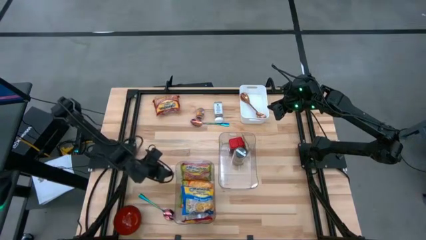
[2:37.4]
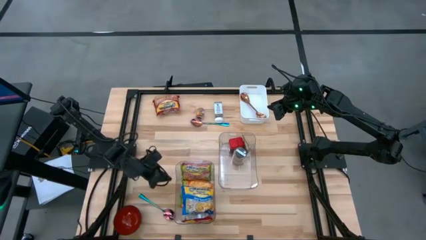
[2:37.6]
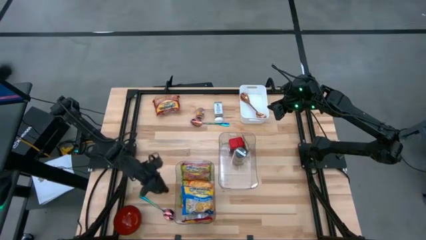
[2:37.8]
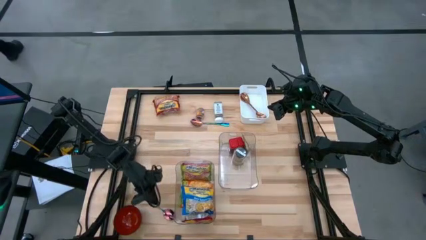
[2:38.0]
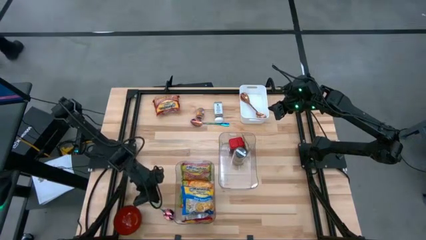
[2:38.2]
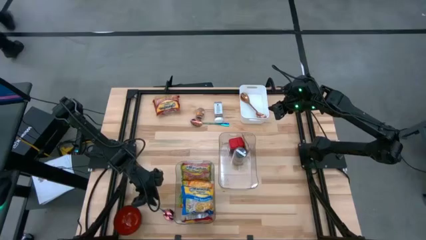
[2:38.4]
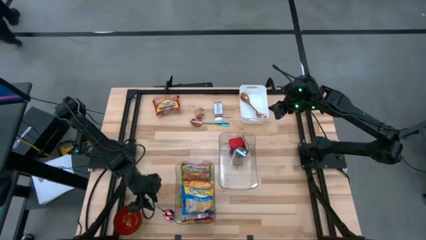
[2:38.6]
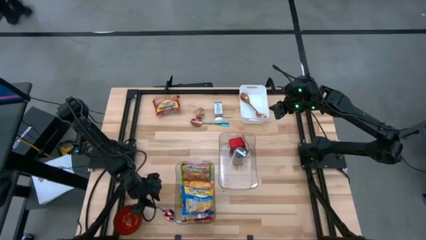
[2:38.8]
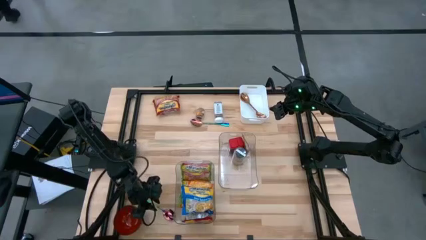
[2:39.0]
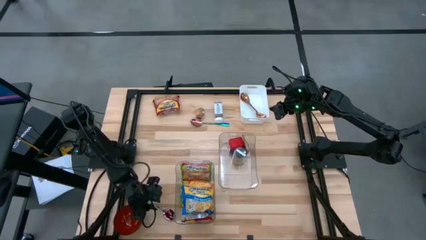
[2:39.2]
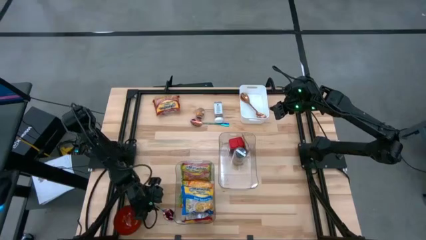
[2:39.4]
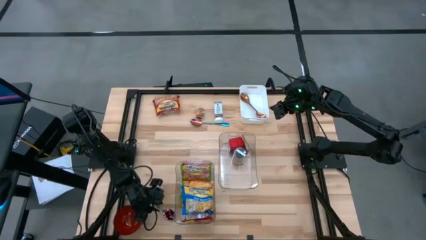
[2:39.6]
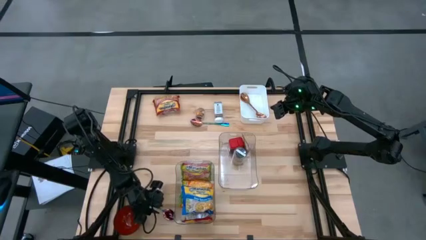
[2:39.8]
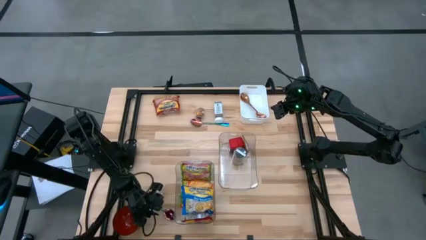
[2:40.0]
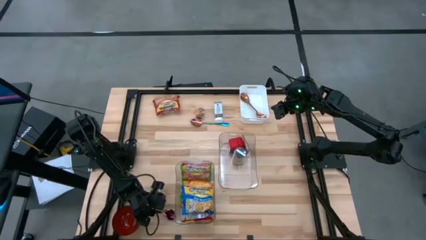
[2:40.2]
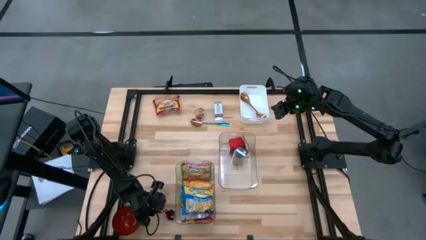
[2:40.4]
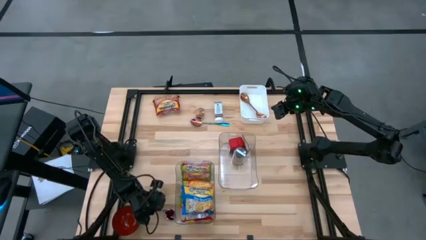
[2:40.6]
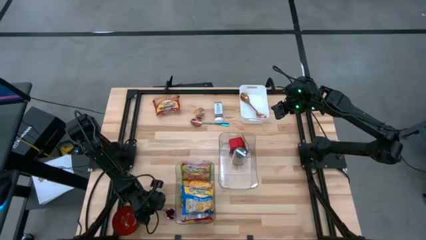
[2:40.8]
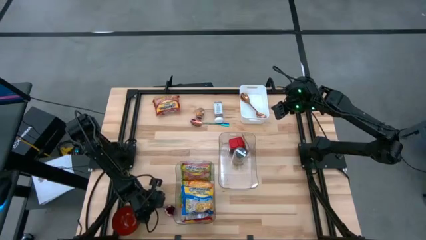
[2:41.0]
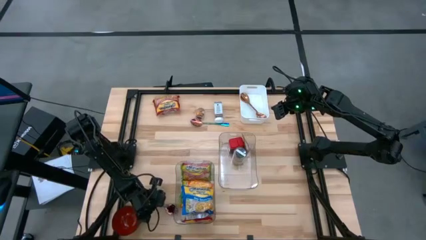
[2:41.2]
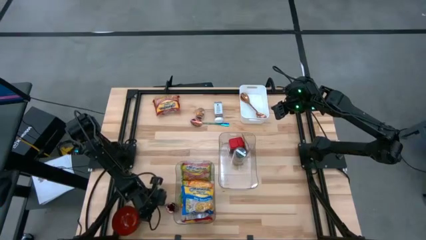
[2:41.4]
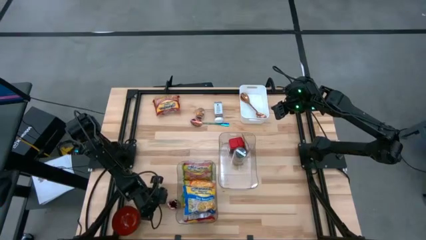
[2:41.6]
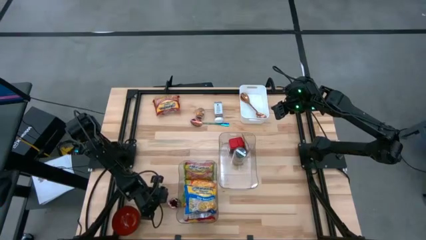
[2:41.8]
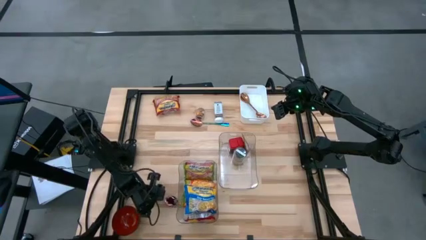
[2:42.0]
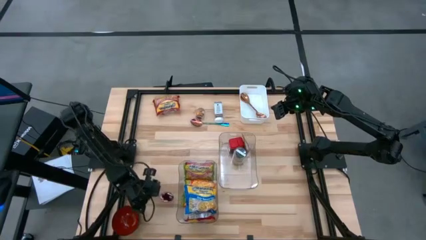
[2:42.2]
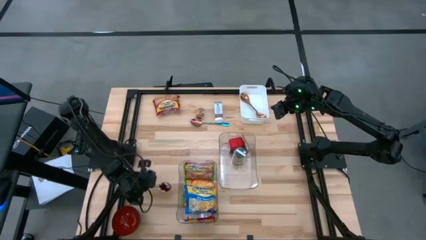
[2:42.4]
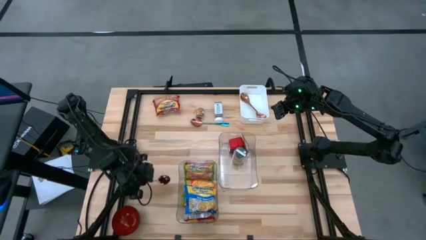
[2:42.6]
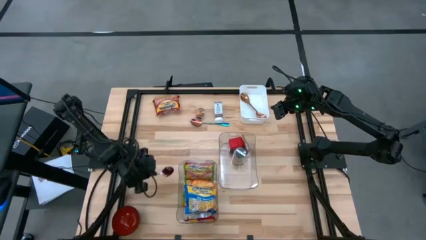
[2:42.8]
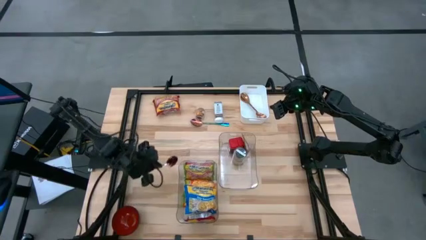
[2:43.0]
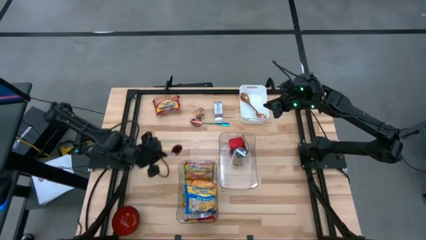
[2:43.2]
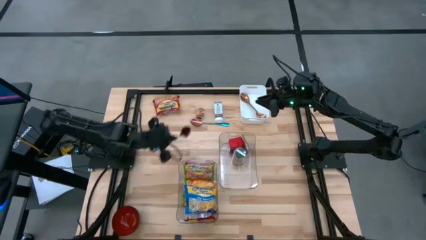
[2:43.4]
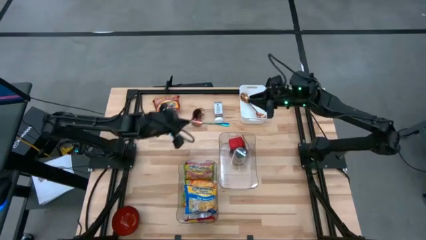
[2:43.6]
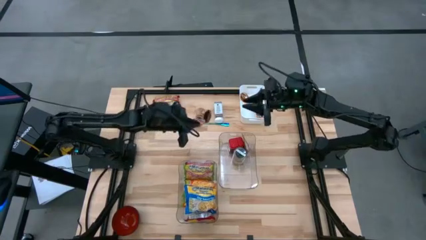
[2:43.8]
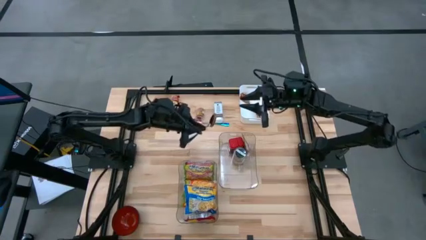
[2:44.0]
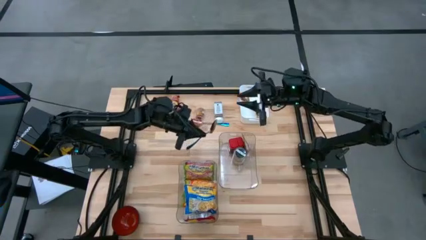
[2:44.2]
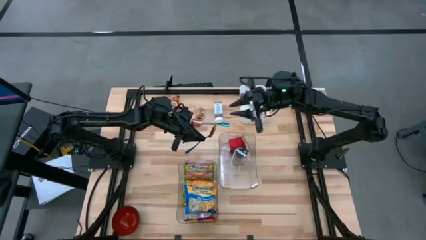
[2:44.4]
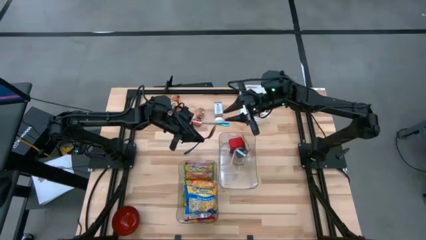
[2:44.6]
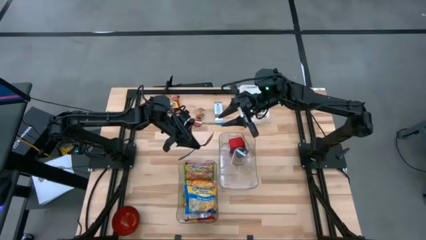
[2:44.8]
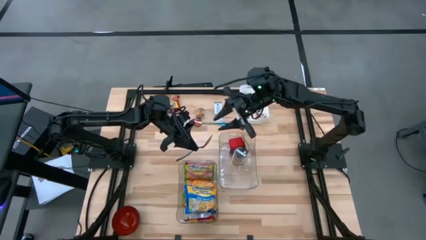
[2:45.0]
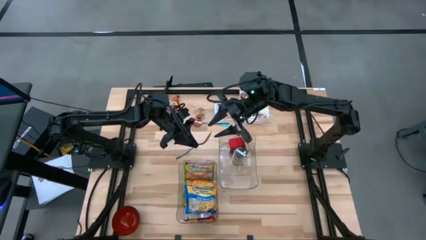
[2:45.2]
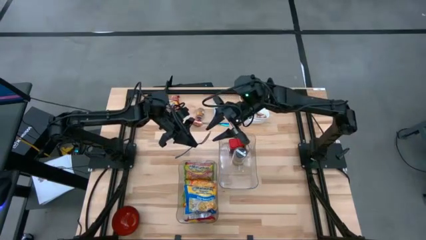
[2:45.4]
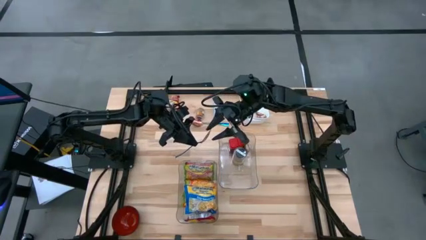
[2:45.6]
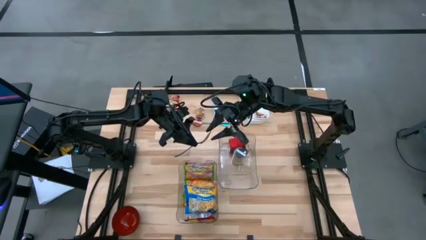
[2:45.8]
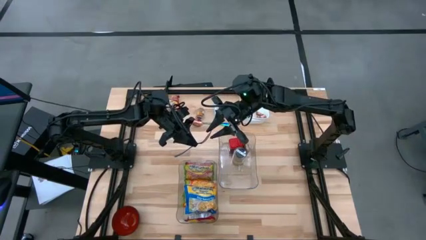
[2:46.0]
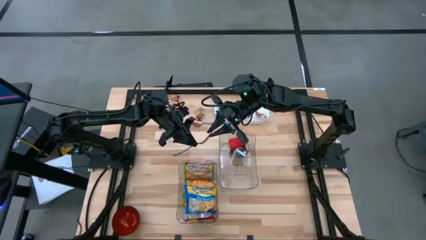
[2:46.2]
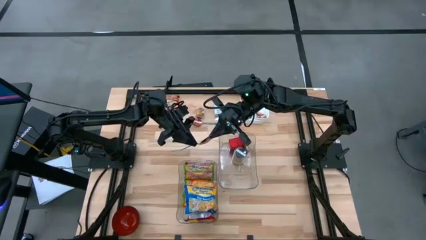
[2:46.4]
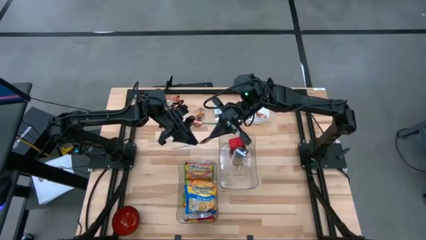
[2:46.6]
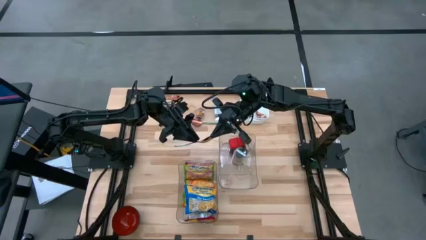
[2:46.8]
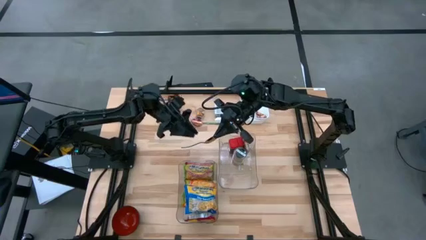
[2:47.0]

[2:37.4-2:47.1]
Task: Pick & Place Food Item
Put the bottom blue spoon into the white bin

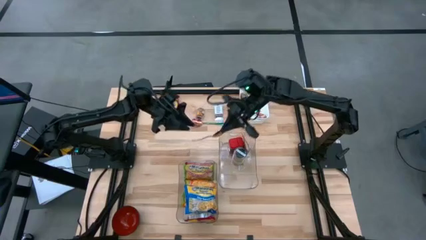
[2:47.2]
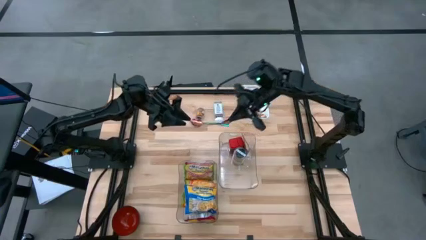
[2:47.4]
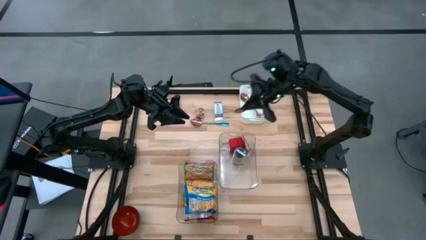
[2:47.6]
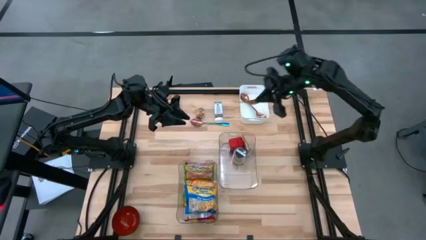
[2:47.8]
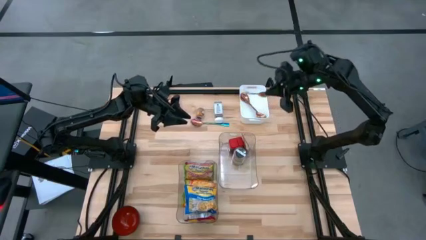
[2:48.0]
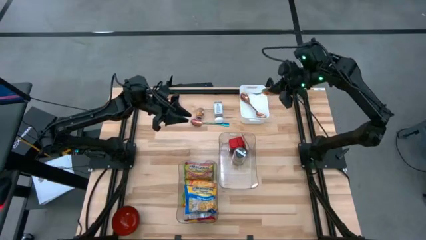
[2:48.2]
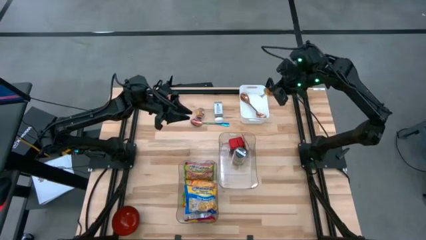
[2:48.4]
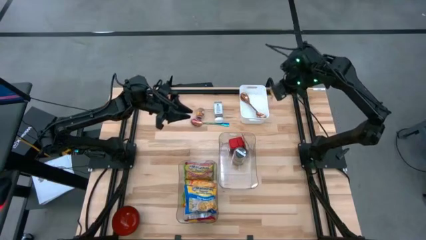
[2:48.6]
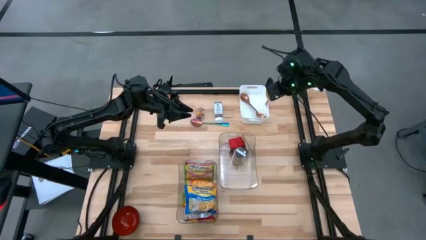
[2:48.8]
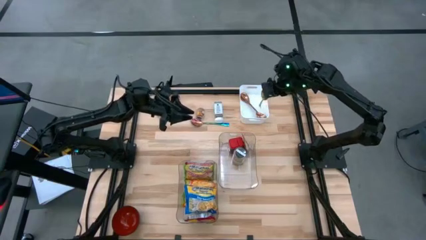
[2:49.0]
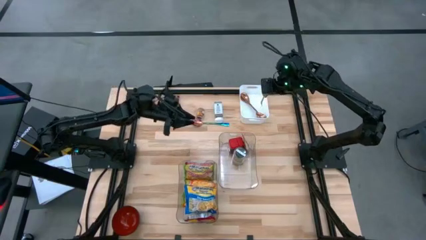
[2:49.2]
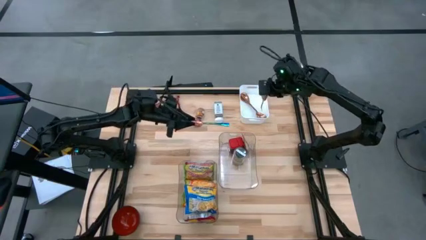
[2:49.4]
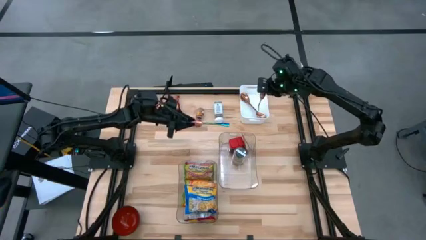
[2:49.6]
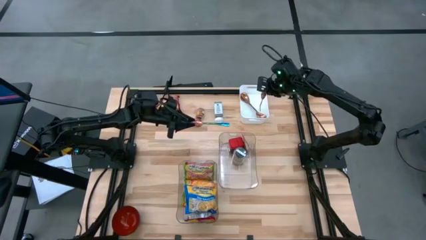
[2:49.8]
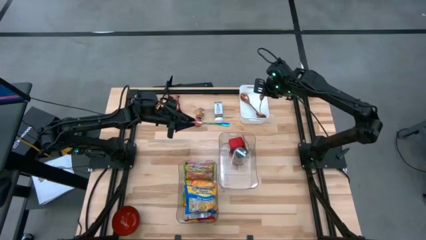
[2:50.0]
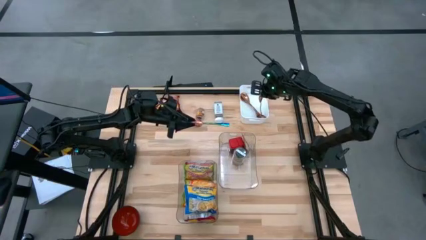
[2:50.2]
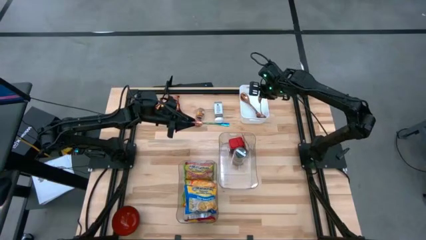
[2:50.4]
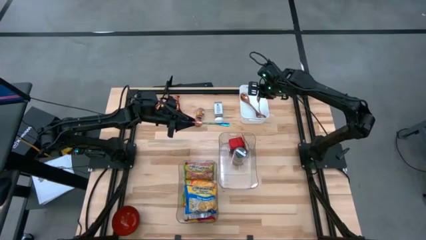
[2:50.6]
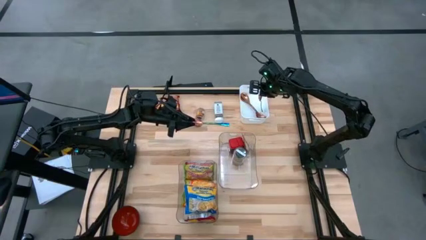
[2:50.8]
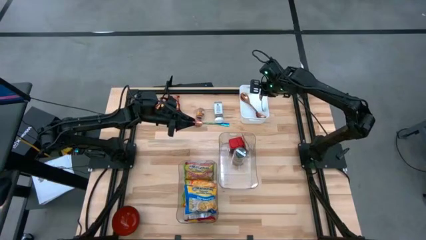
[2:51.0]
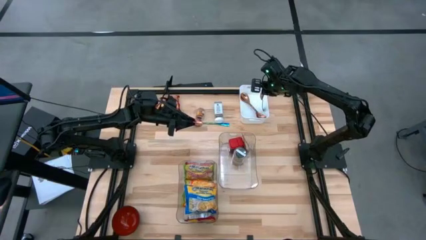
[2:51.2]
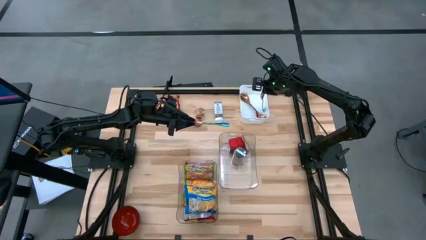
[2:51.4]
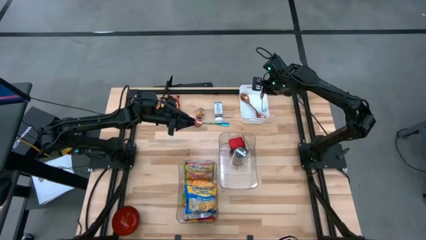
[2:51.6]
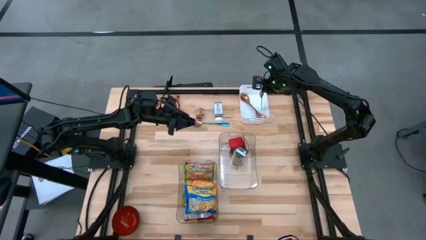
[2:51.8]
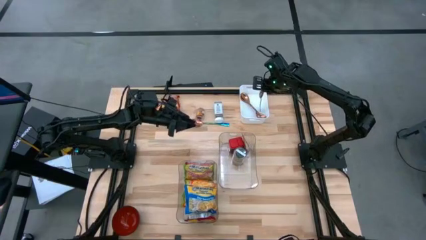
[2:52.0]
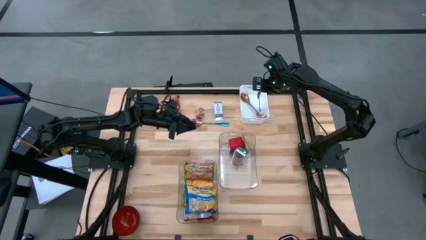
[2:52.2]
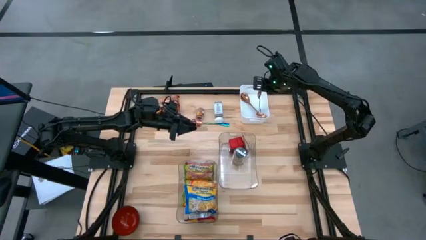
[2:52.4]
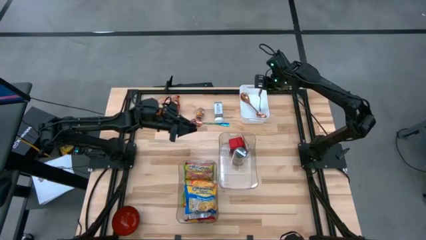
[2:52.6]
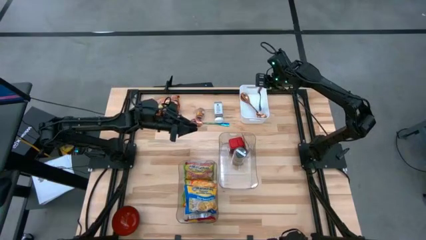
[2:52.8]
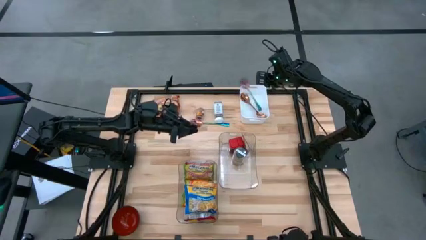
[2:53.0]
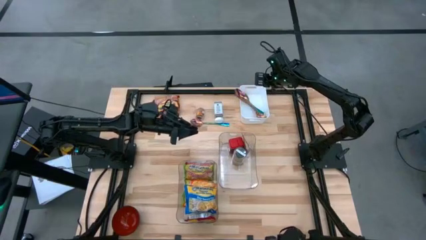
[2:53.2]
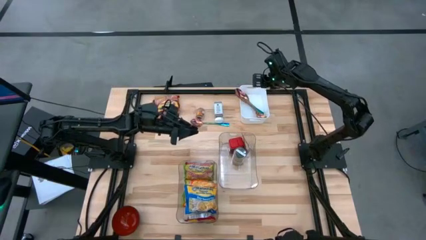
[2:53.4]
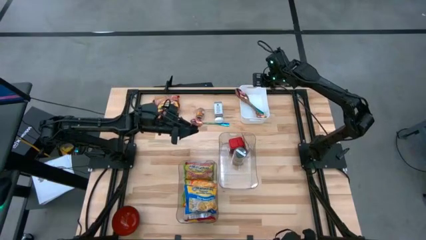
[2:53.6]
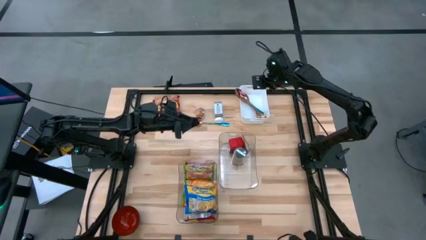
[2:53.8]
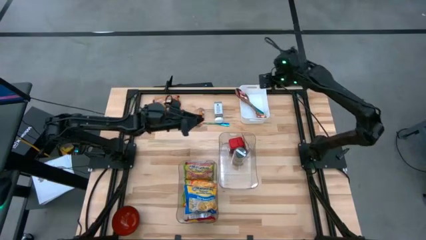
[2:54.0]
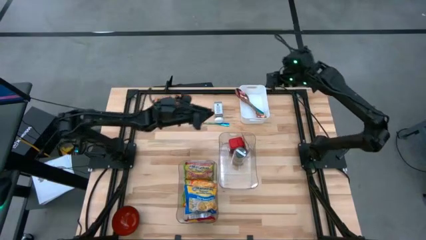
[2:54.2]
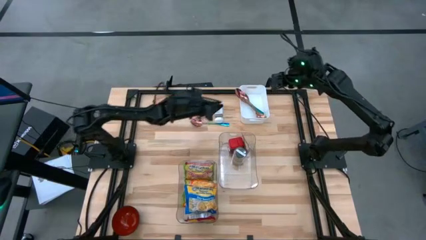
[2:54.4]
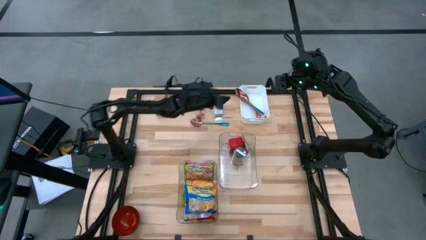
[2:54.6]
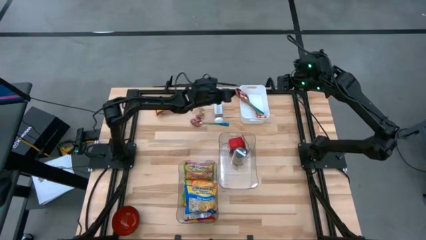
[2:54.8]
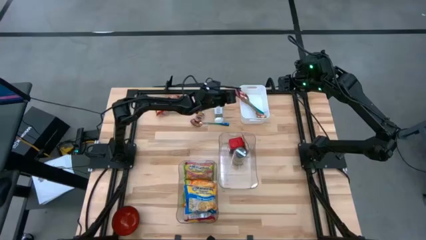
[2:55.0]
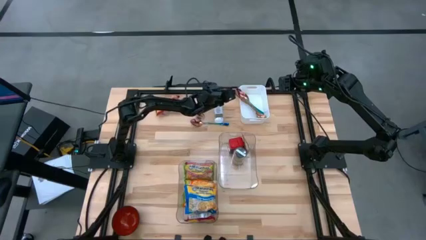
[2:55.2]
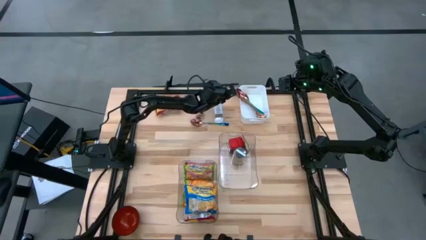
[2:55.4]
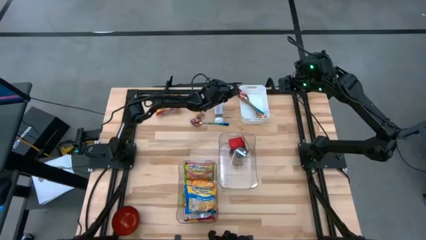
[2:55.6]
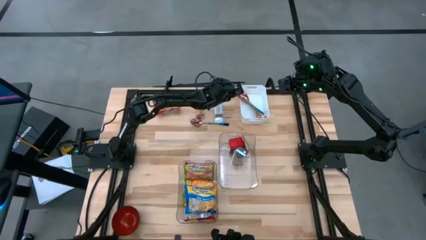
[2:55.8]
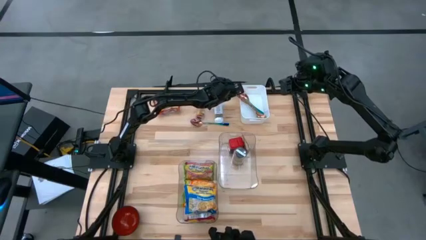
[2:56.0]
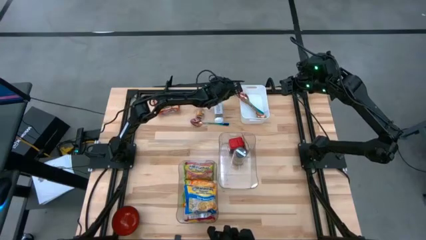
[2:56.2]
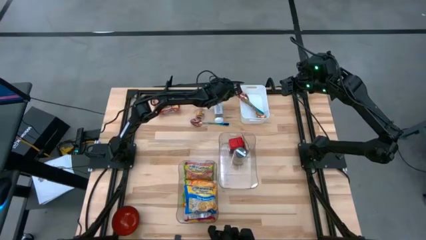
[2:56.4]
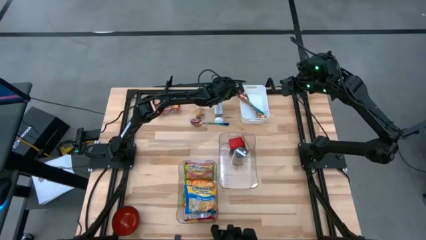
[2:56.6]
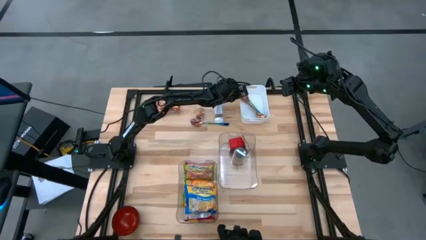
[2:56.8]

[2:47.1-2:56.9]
Put the bottom blue spoon into the white bin
